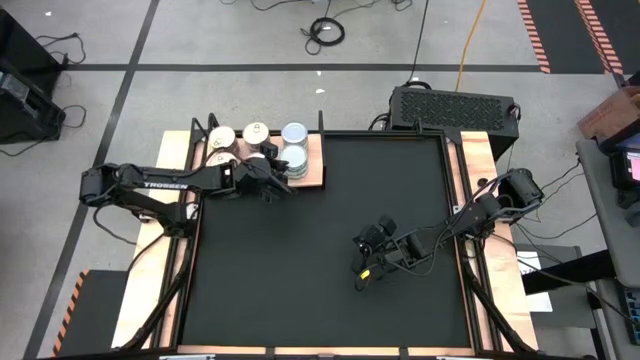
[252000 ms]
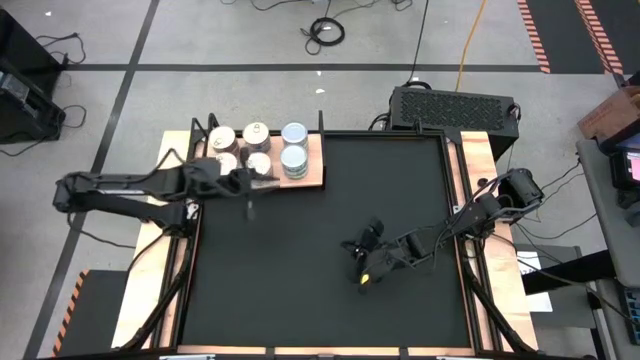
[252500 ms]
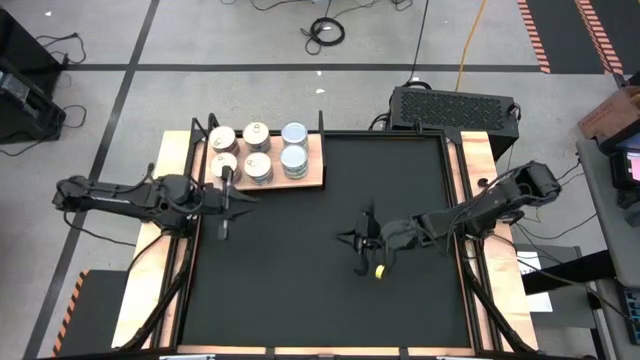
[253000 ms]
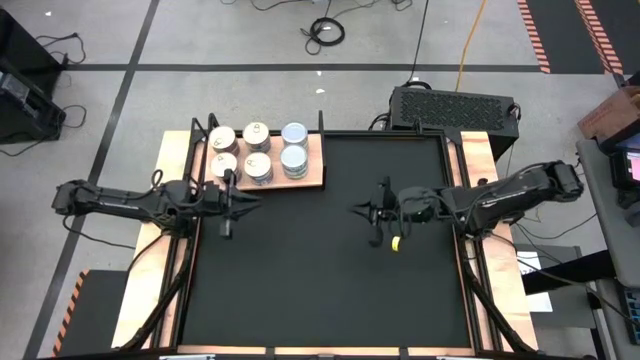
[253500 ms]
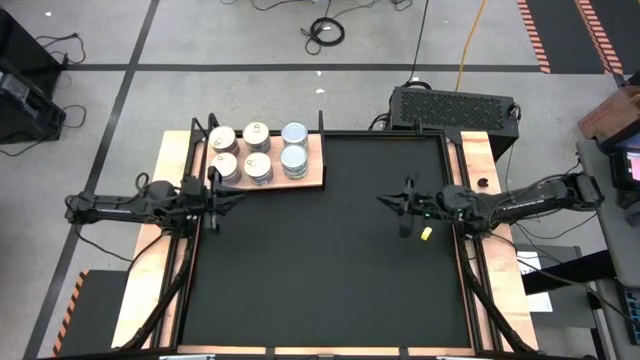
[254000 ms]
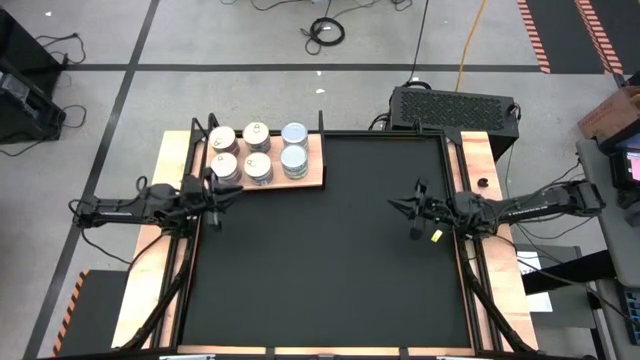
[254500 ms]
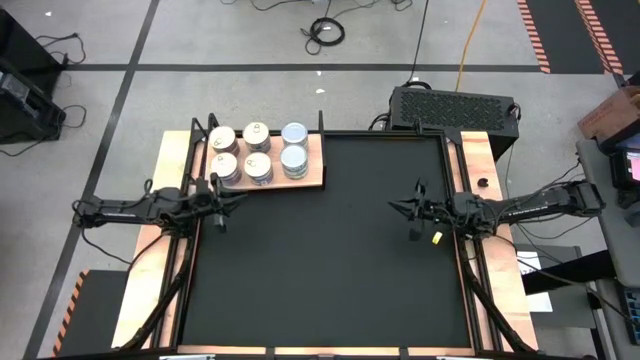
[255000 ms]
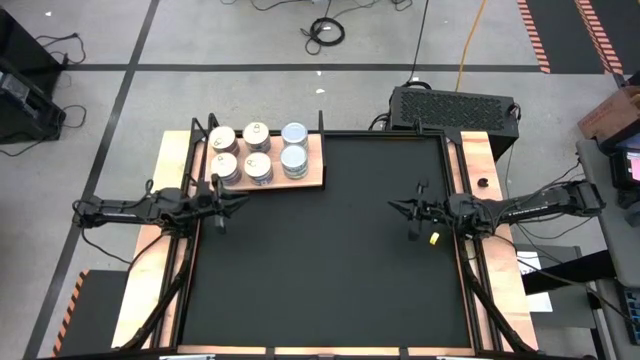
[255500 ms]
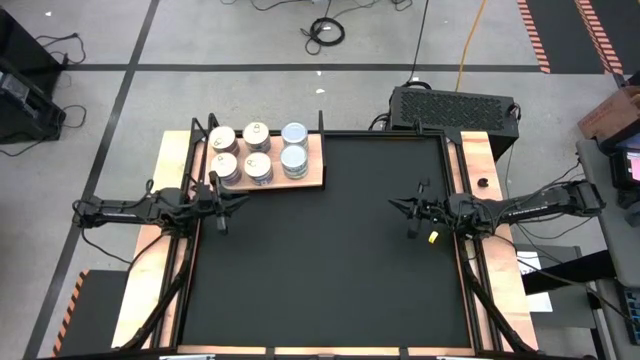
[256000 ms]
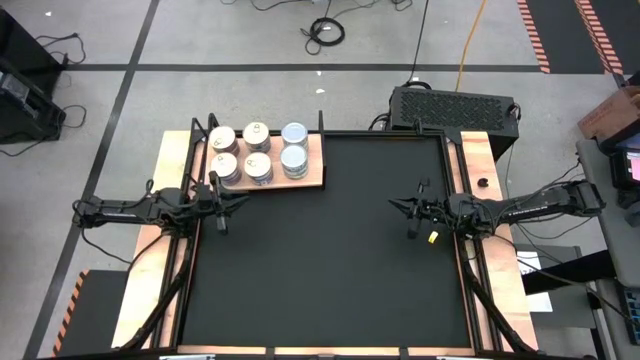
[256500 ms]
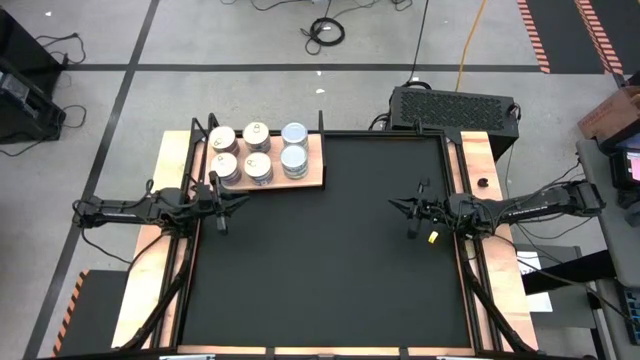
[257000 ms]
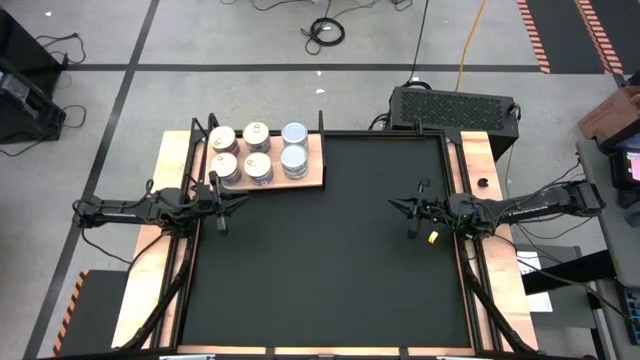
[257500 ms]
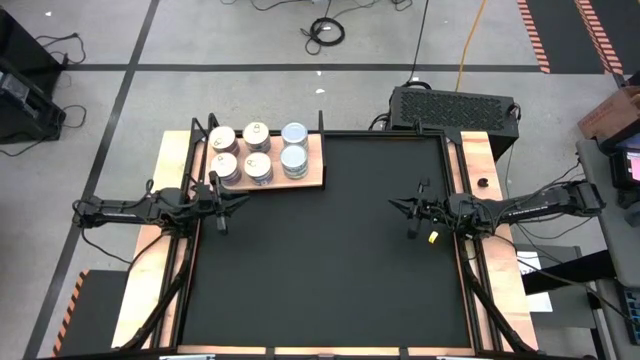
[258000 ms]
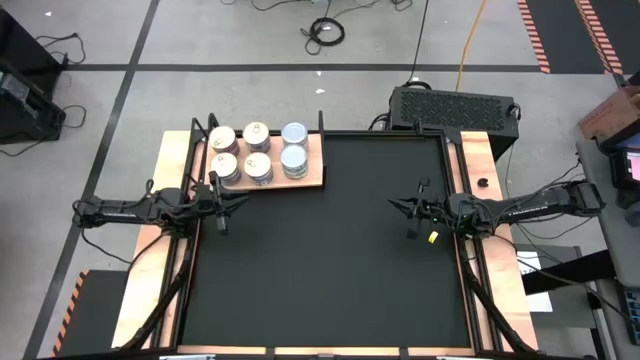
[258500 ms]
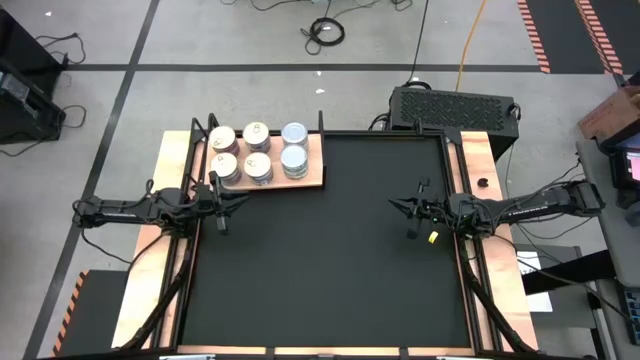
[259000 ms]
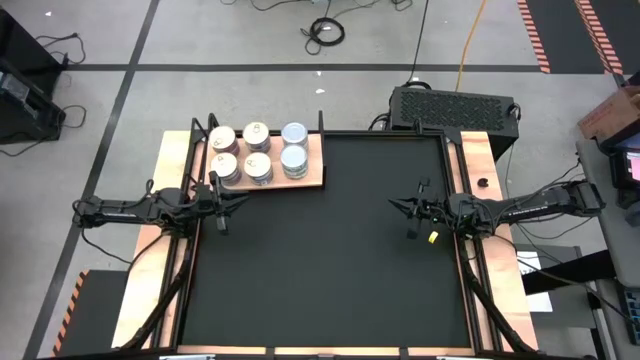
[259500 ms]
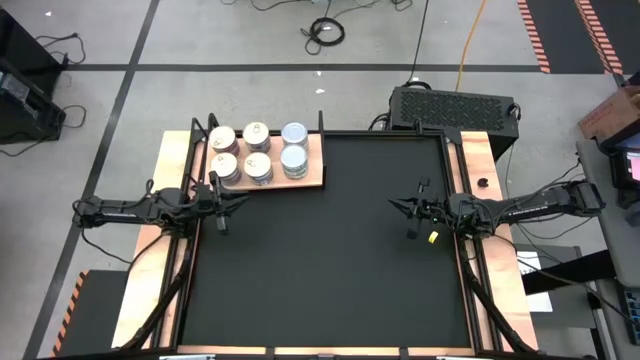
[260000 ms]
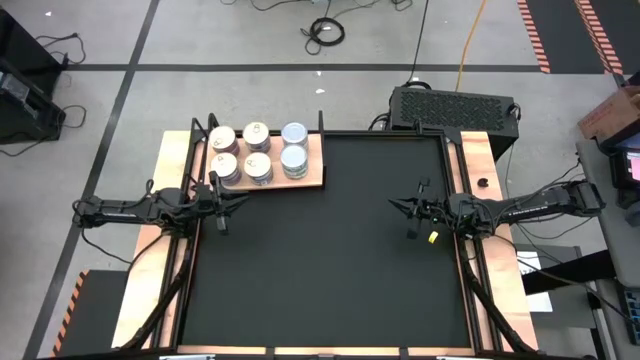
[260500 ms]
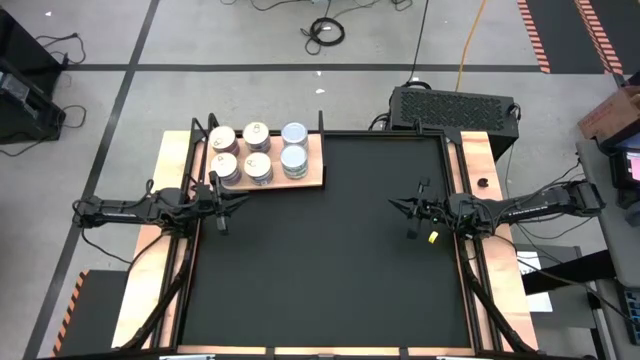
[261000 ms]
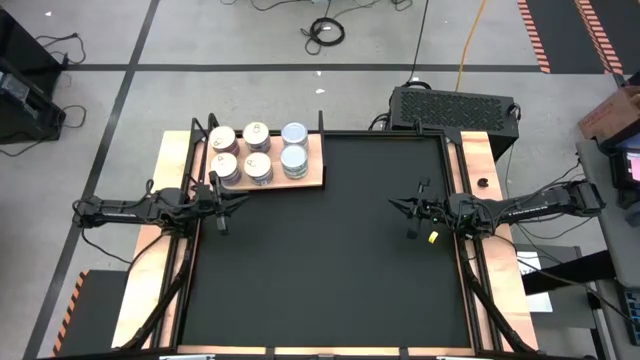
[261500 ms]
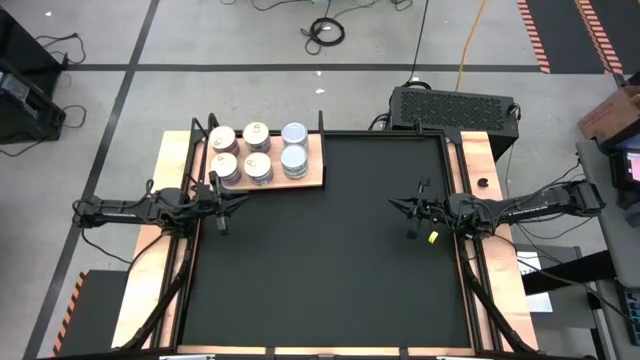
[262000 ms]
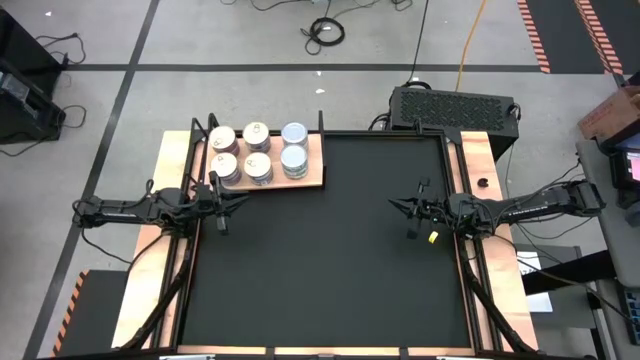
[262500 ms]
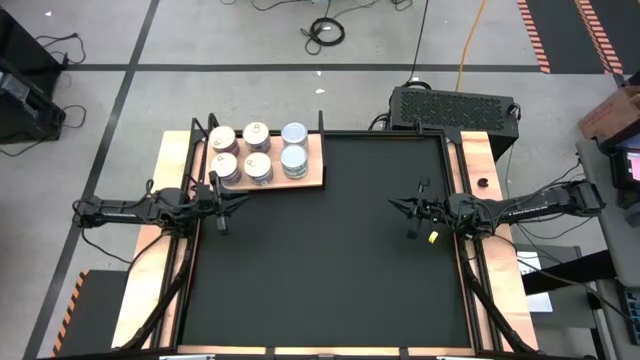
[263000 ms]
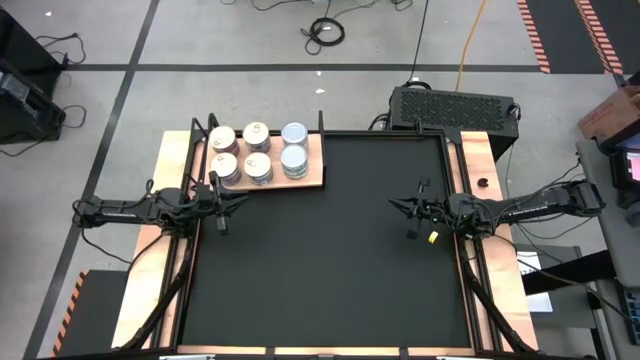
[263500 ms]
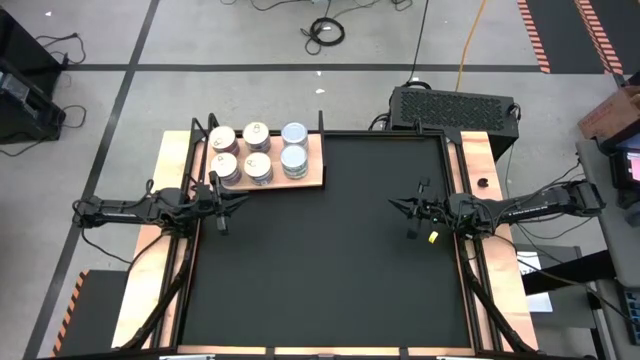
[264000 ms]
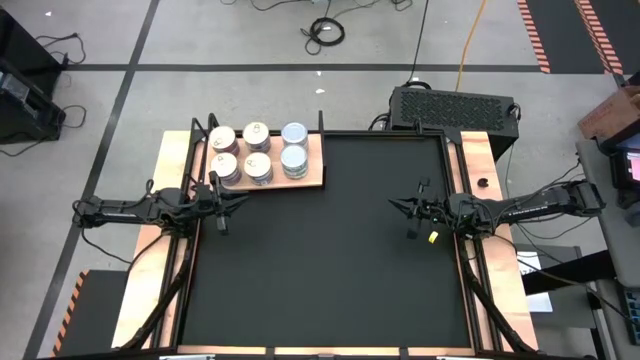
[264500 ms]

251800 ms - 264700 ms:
Task: Stack canned seafood by type on shelf
Return to Home Position

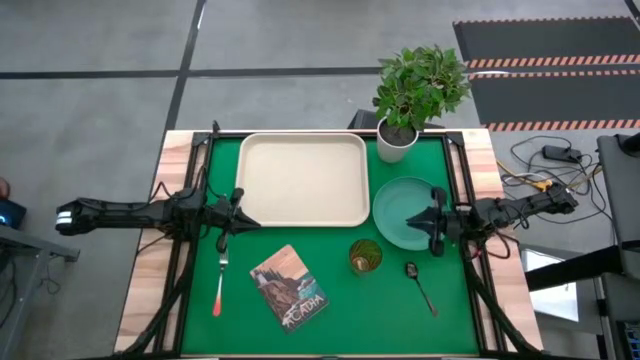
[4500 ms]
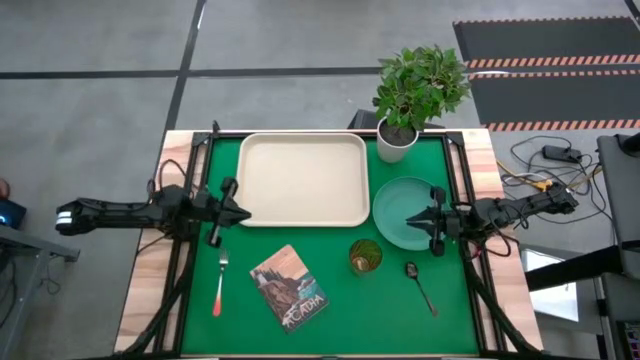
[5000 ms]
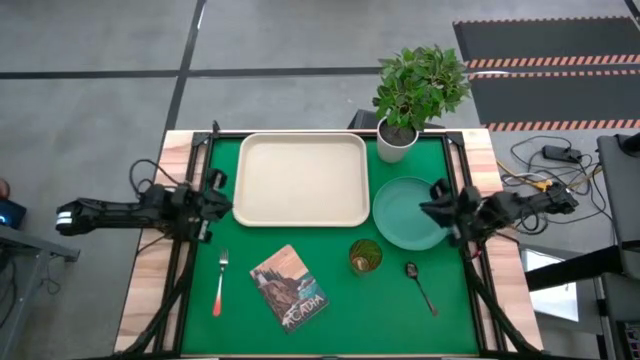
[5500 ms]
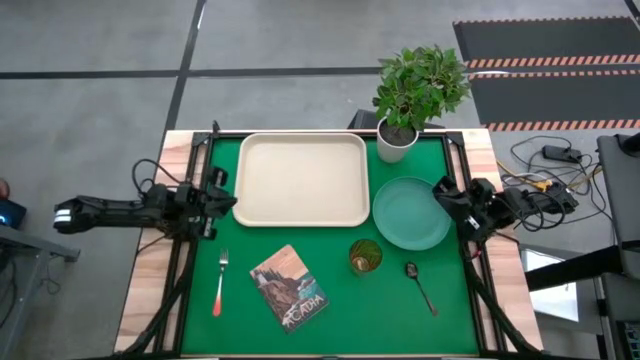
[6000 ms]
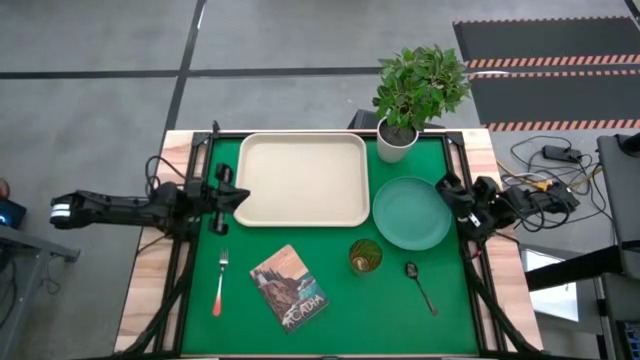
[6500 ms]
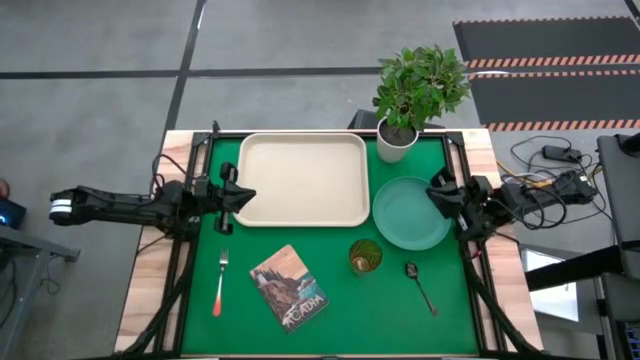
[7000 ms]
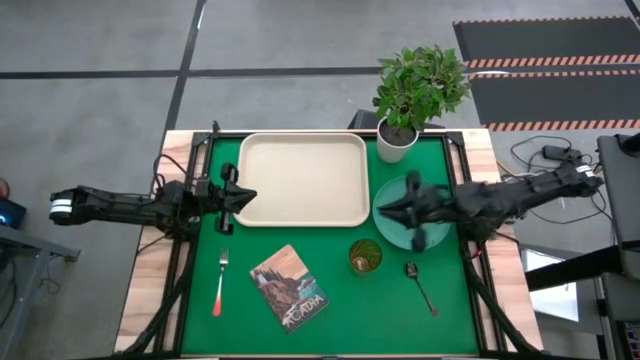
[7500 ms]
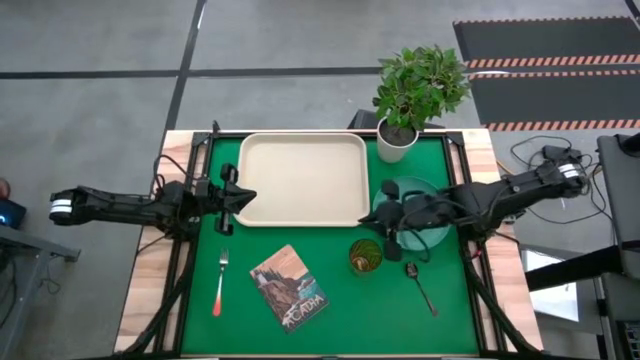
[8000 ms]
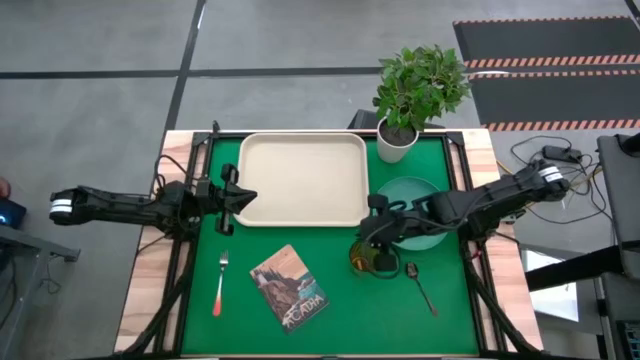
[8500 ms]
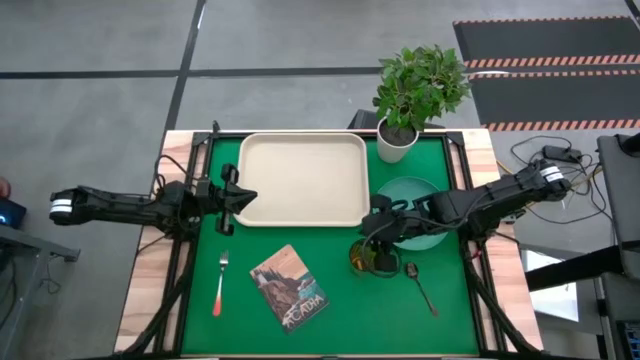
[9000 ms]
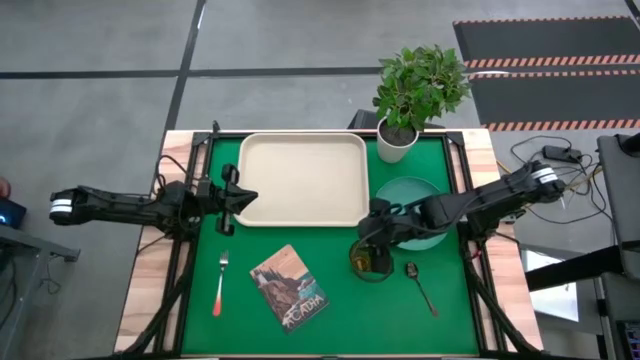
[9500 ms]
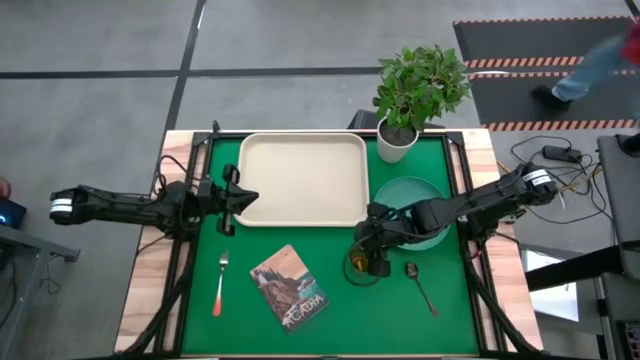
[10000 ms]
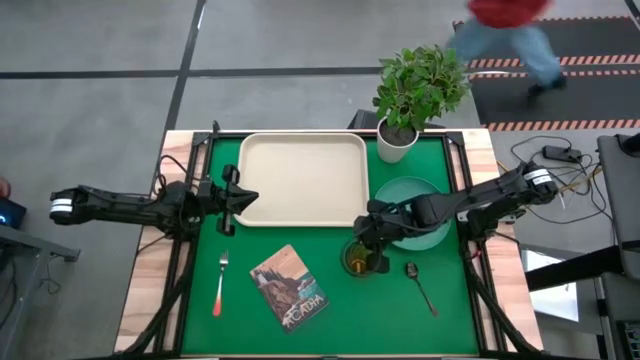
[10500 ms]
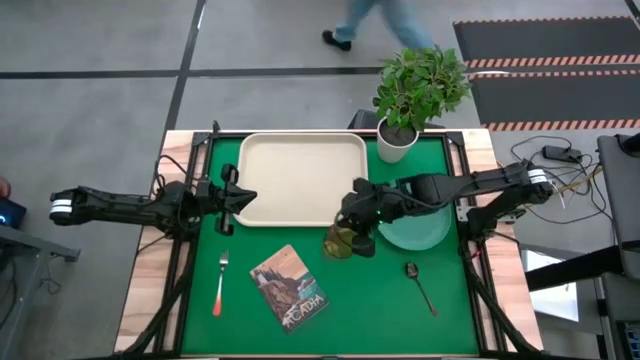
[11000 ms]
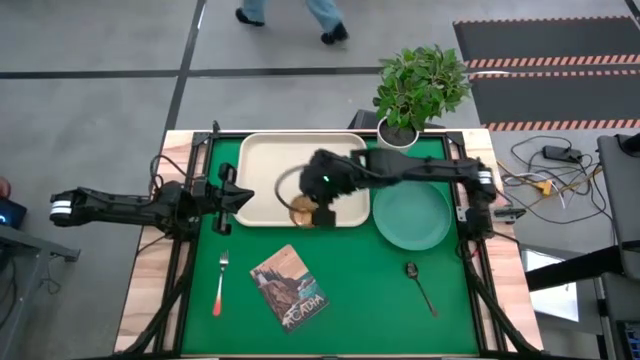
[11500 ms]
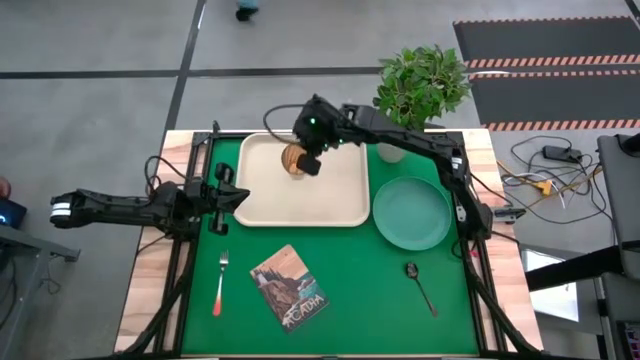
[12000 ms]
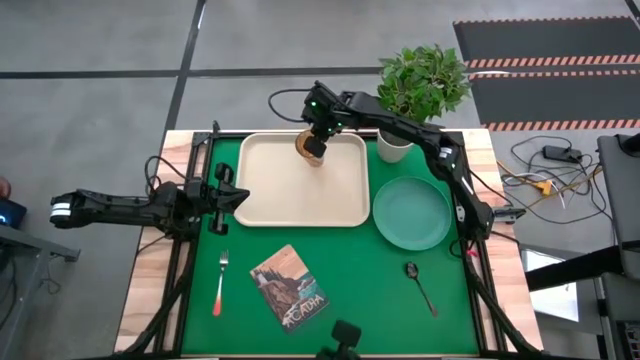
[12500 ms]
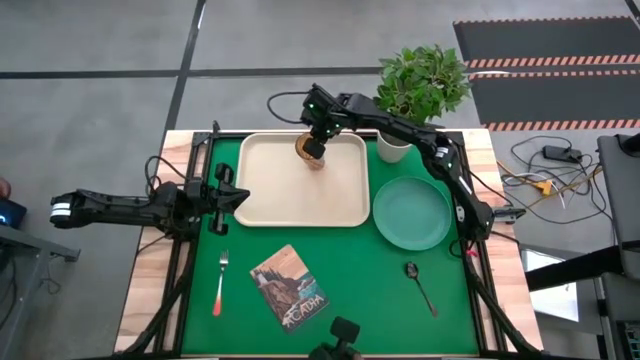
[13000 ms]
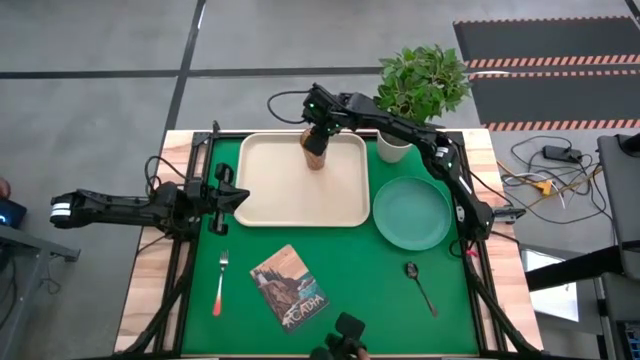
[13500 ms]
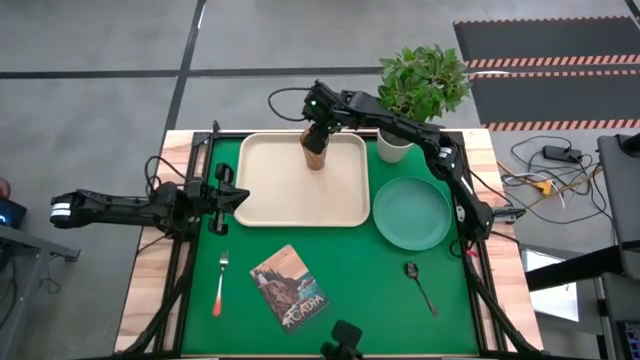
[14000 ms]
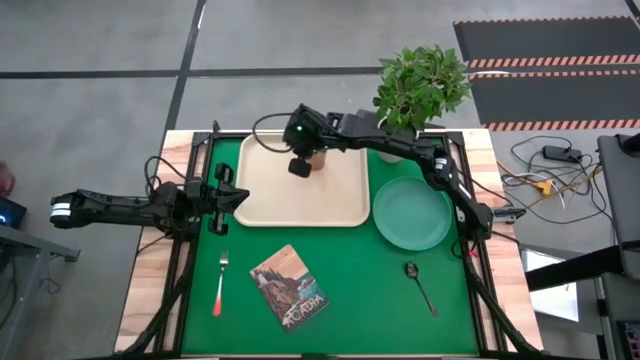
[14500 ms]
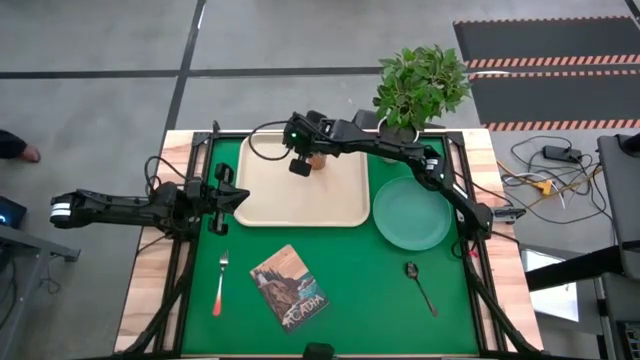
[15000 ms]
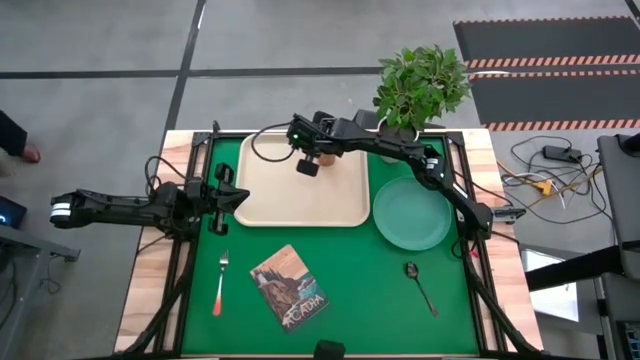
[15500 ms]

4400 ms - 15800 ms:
Task: Pick and place plate/cup/fork/spoon on tray
Put the brown cup on the top of the tray
